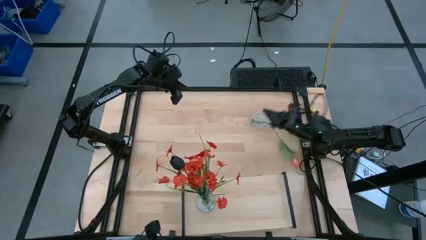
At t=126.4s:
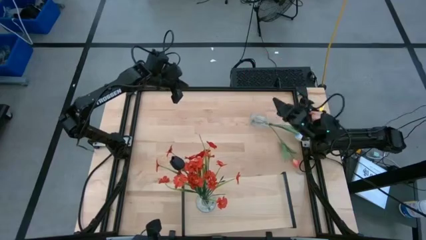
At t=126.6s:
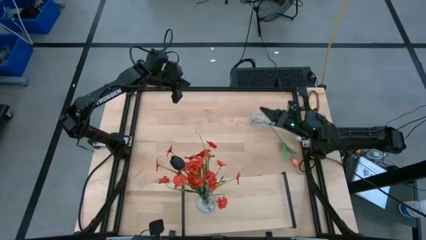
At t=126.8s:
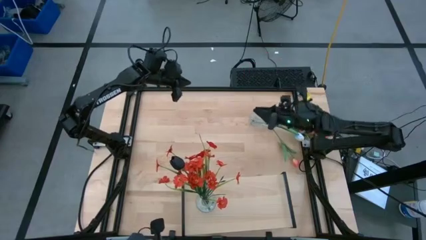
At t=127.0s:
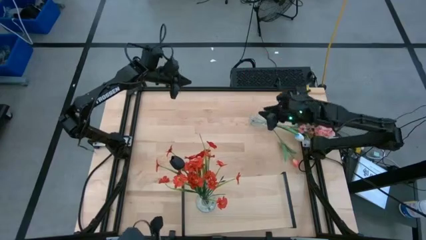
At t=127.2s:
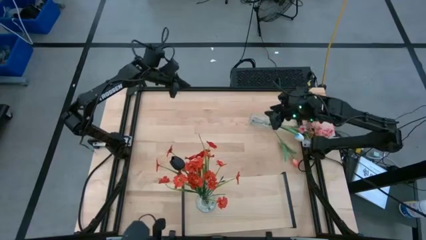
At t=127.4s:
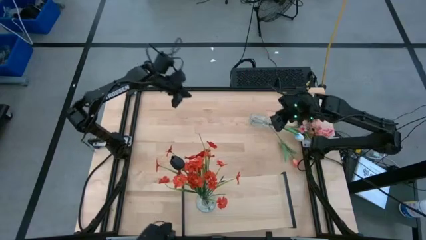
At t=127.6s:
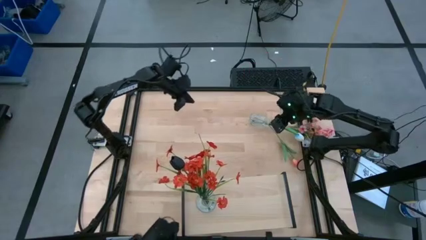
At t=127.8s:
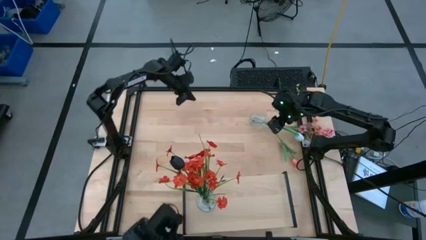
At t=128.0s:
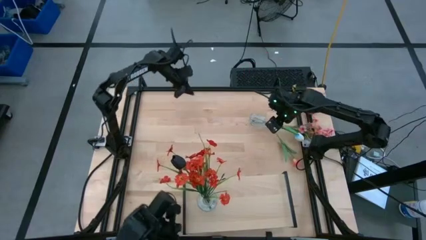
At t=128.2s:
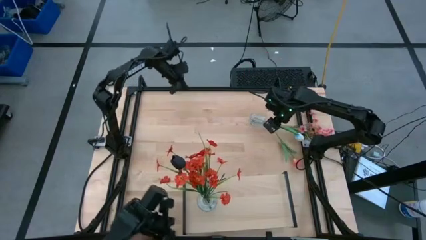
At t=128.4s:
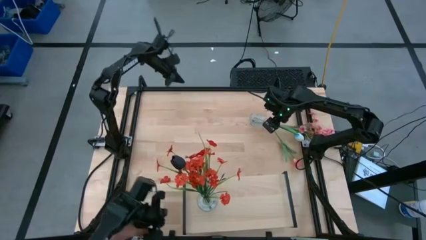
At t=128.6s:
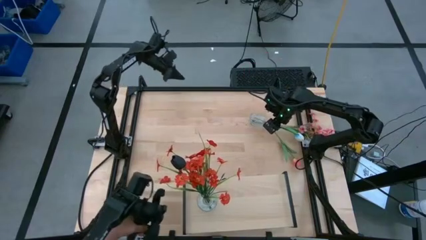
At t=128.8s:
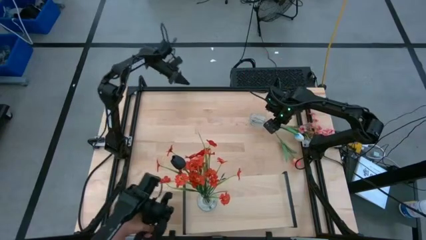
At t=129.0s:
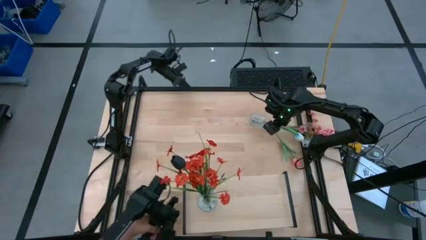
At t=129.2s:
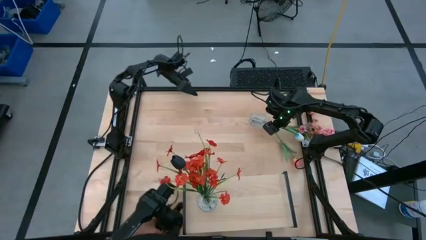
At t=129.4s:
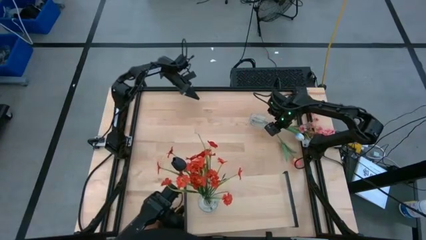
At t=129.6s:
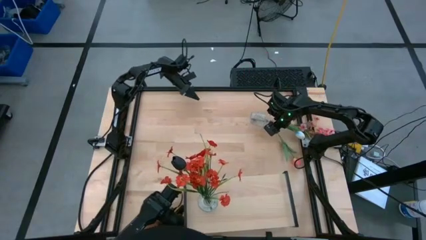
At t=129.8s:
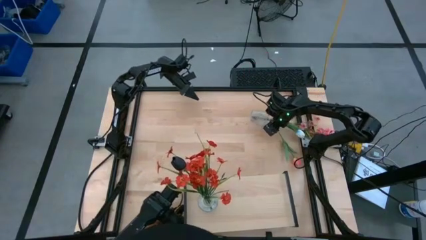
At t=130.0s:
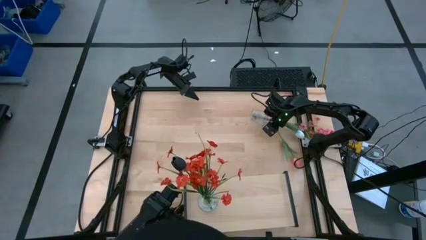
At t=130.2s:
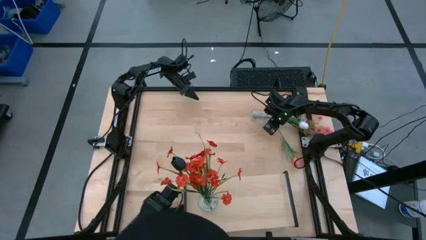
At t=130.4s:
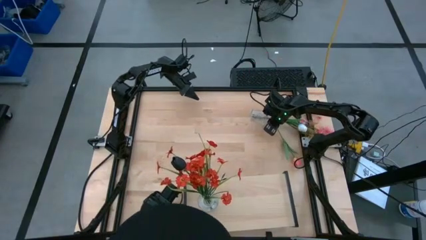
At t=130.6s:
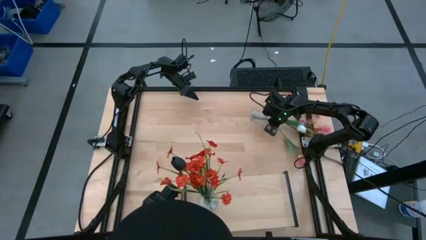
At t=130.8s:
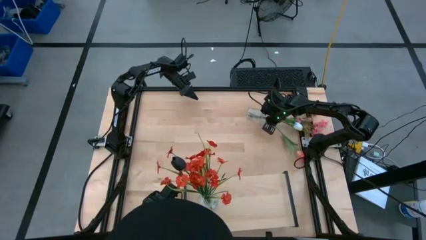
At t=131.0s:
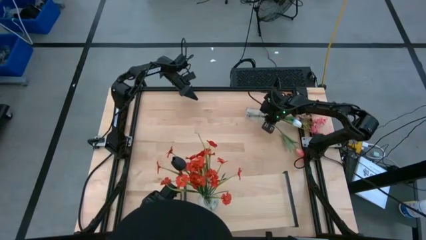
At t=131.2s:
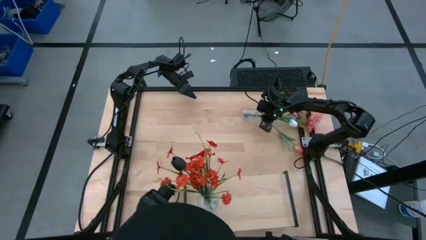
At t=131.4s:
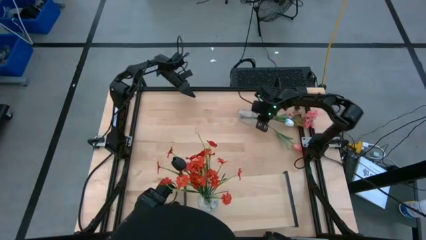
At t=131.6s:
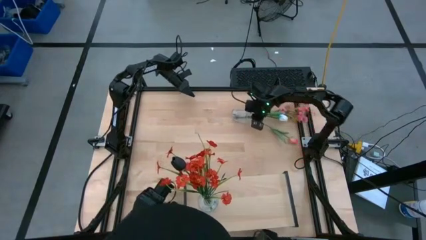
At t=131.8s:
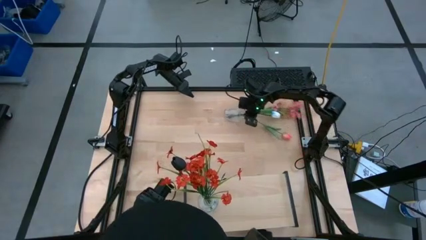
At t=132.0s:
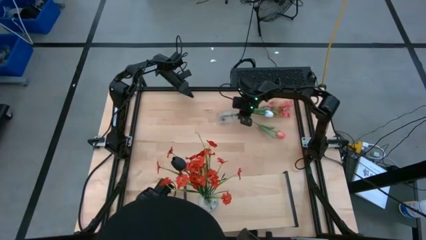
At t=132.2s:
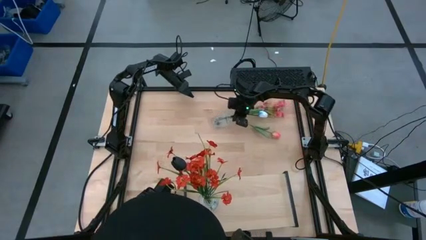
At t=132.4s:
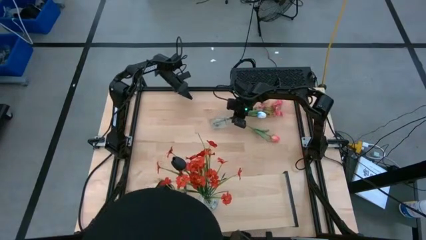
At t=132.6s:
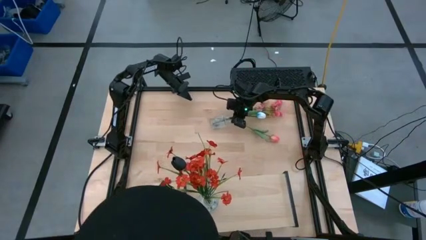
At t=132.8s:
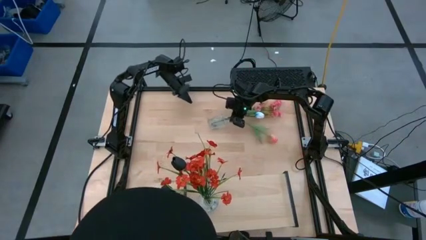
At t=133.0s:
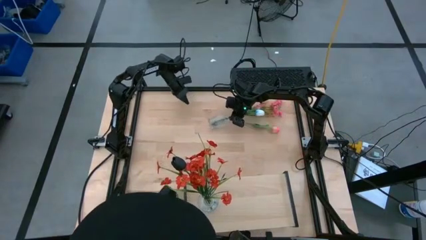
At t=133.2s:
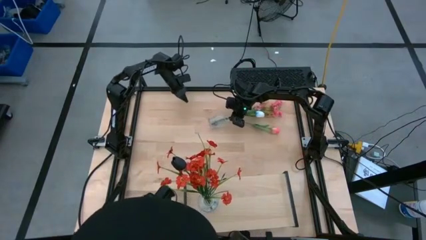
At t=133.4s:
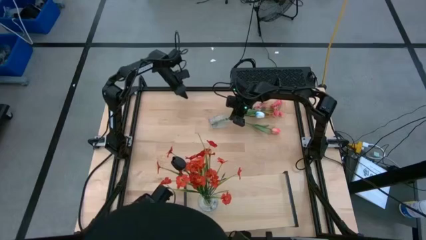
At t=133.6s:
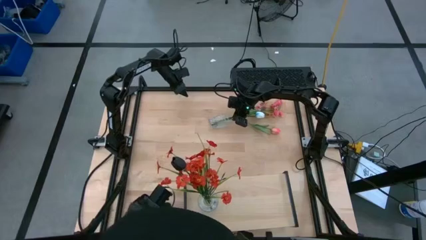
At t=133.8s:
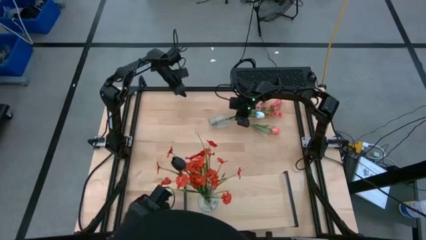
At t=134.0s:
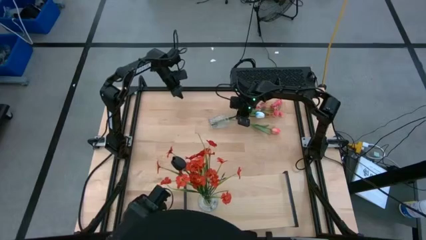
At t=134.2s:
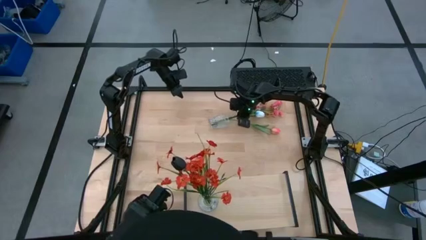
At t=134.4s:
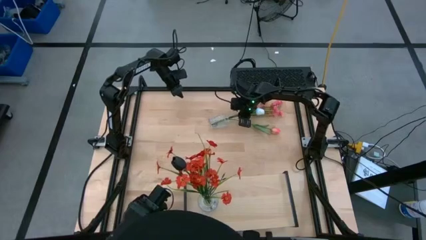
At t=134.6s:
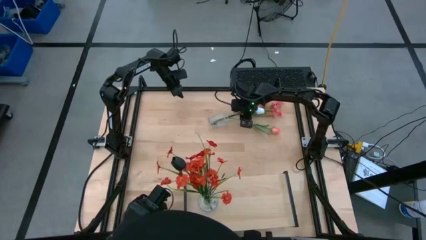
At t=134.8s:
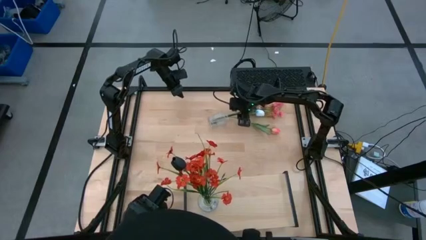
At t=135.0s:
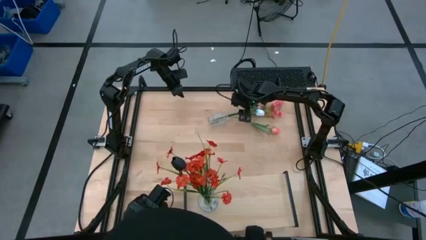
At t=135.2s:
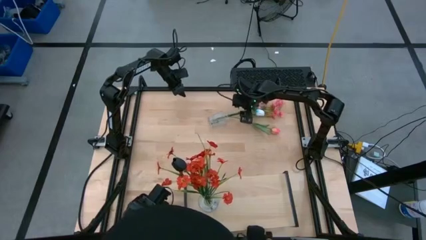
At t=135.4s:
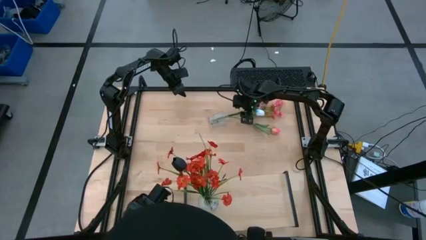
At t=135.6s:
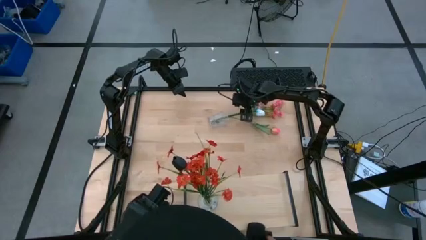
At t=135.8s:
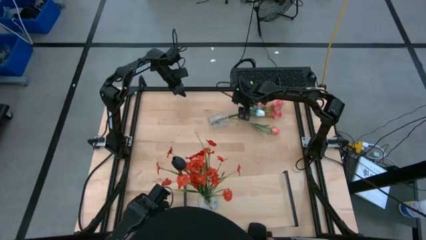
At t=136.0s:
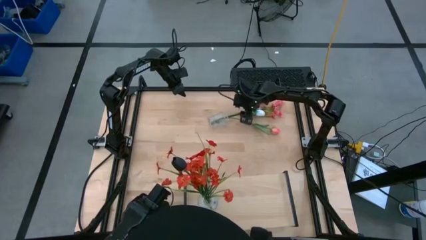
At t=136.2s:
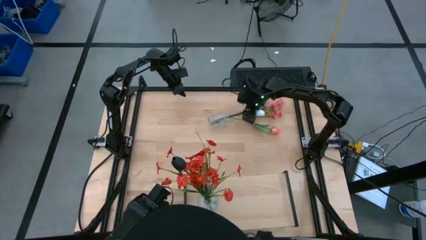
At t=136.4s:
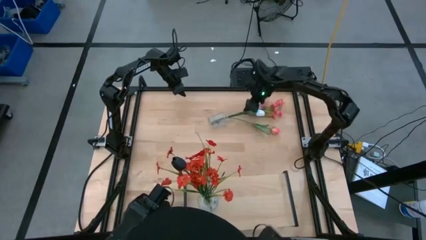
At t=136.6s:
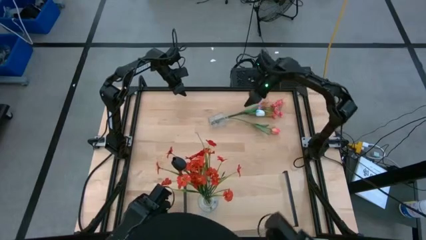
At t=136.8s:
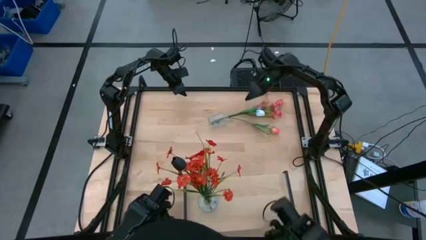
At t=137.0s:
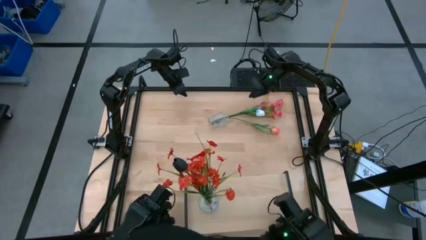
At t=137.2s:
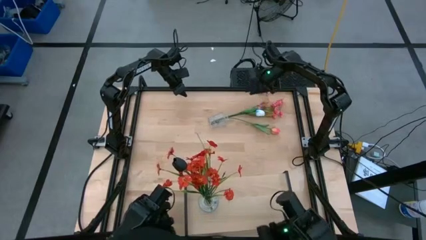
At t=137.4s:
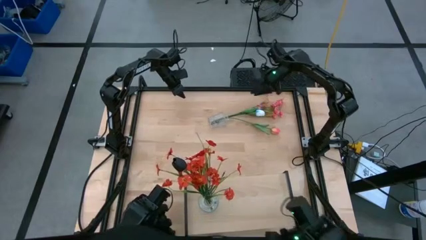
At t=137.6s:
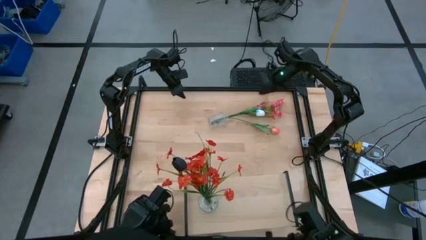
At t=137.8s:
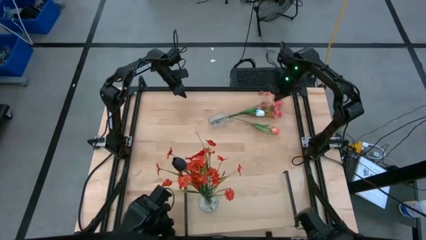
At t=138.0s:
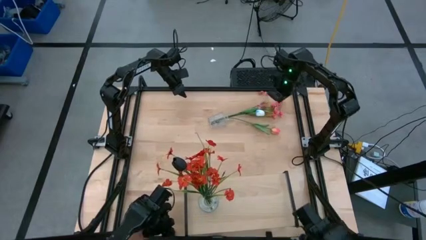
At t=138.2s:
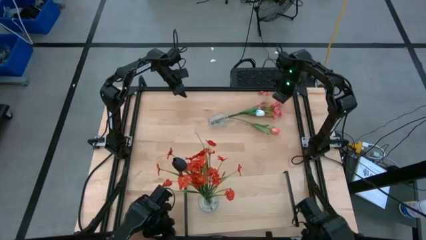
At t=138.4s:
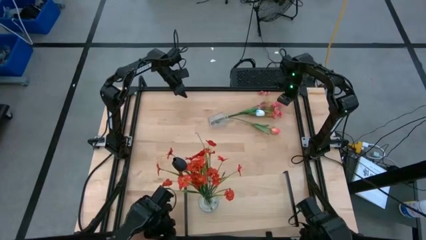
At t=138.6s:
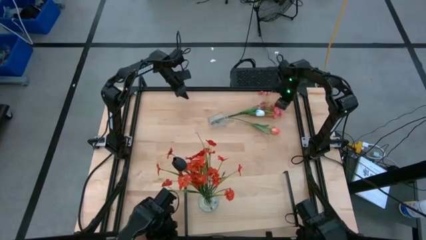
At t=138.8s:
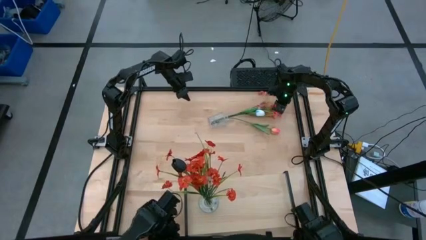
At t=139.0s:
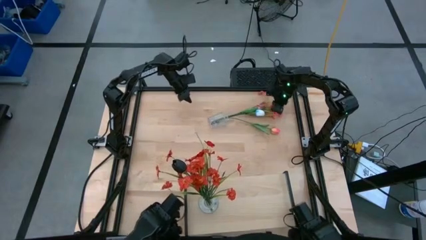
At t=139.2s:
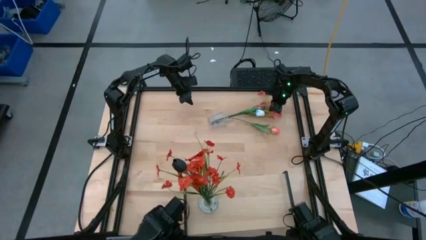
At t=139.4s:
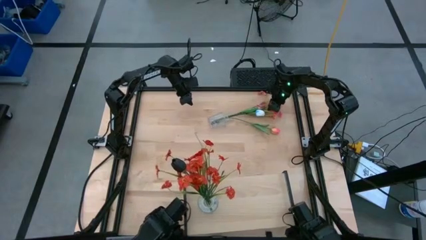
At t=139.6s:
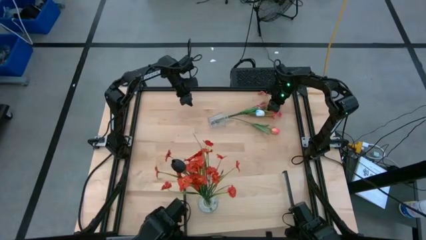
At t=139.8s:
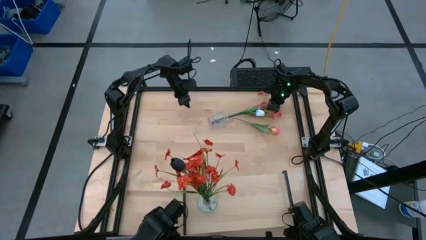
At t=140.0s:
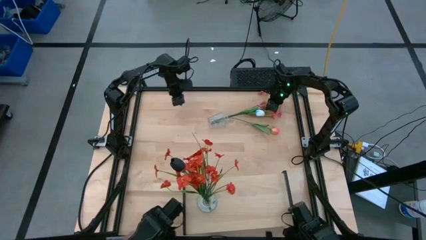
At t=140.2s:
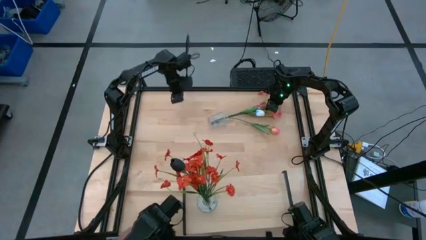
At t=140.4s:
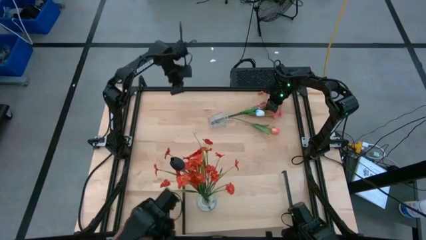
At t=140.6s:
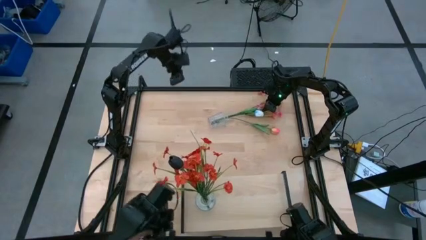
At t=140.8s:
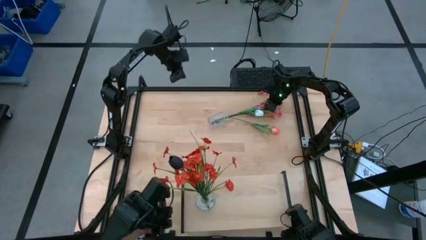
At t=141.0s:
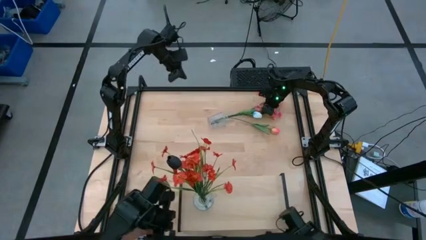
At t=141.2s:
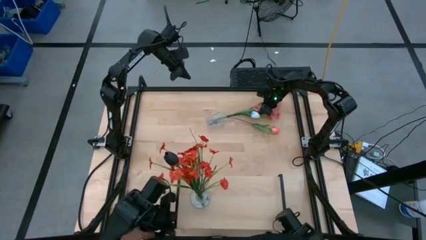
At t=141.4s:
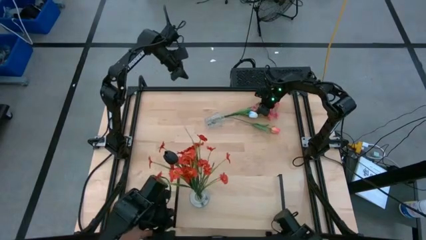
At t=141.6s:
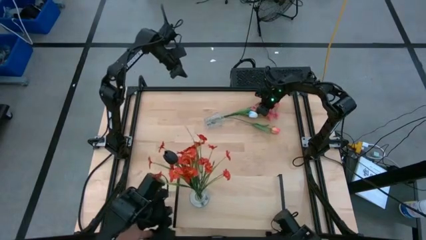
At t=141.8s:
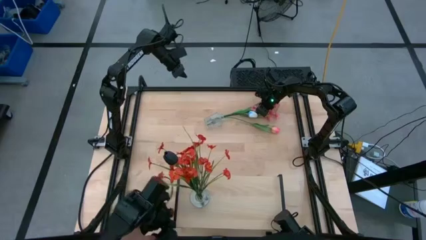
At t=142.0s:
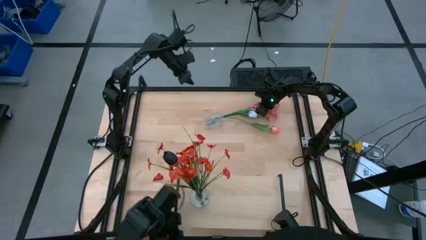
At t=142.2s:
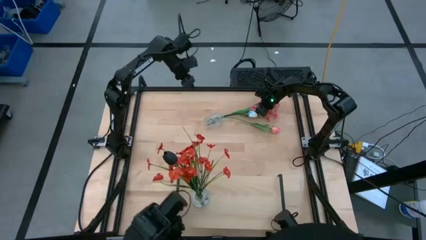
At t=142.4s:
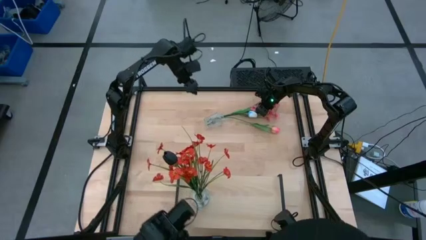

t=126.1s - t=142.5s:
Task: Pick and place flowers into a vace then onto a shelf
Put the pink tulip into the transparent vase
